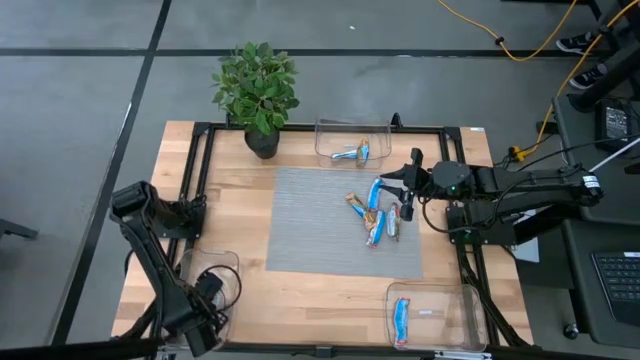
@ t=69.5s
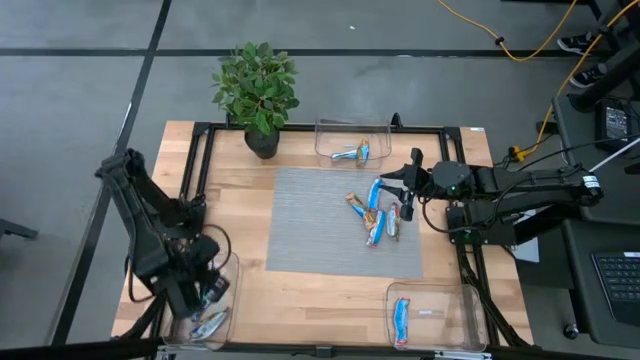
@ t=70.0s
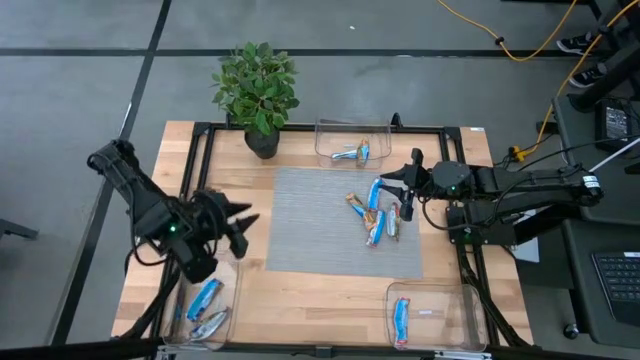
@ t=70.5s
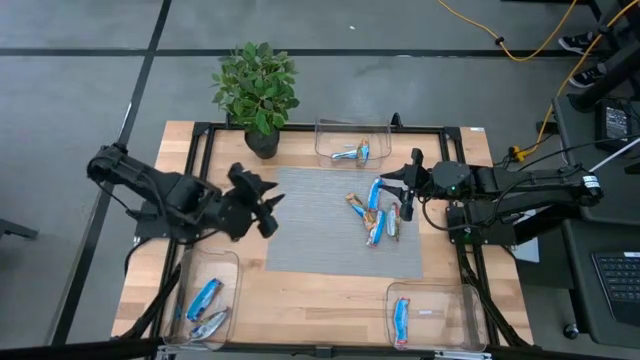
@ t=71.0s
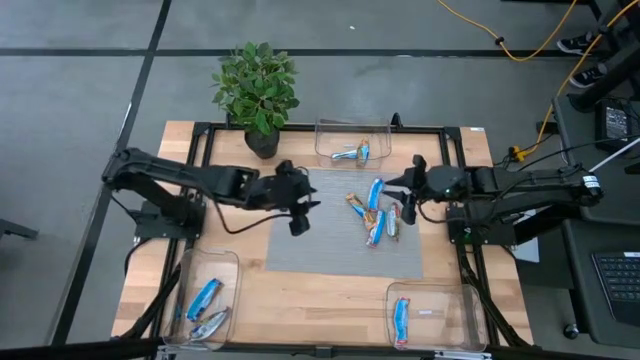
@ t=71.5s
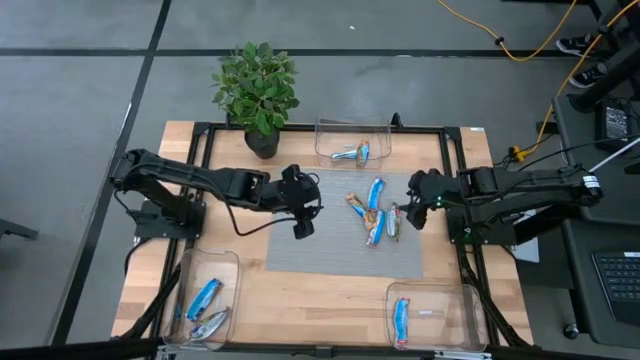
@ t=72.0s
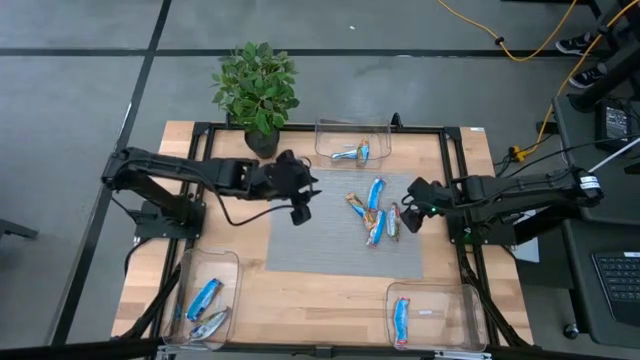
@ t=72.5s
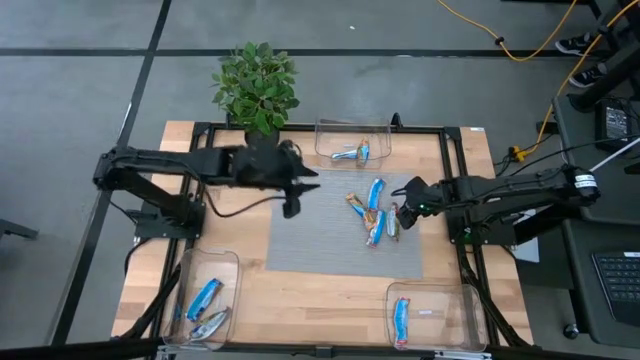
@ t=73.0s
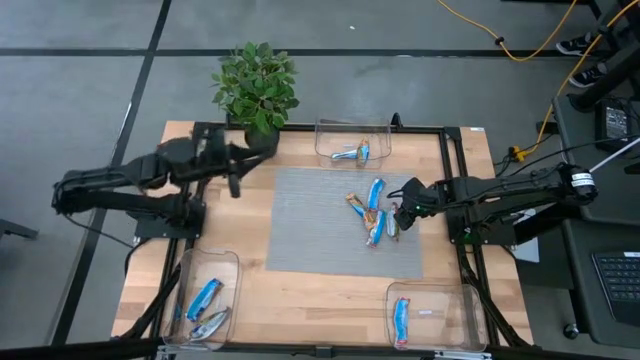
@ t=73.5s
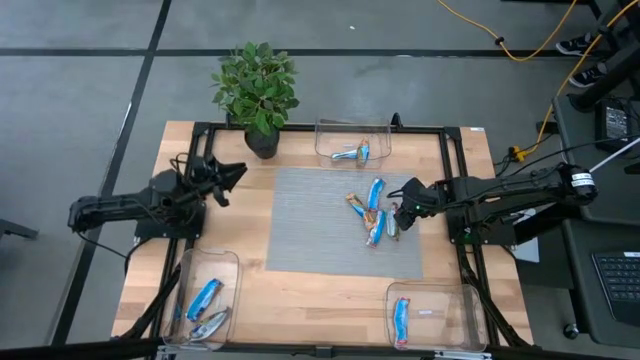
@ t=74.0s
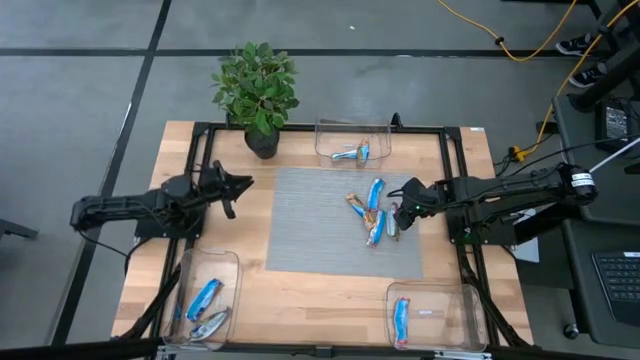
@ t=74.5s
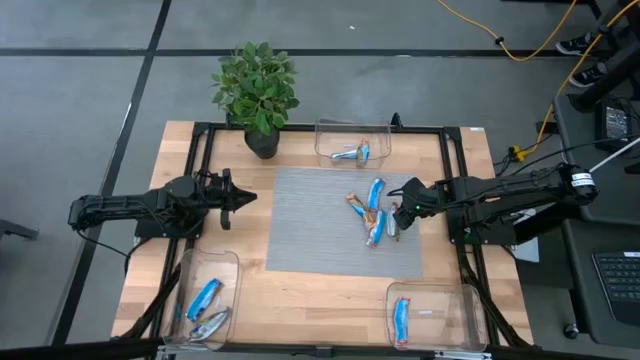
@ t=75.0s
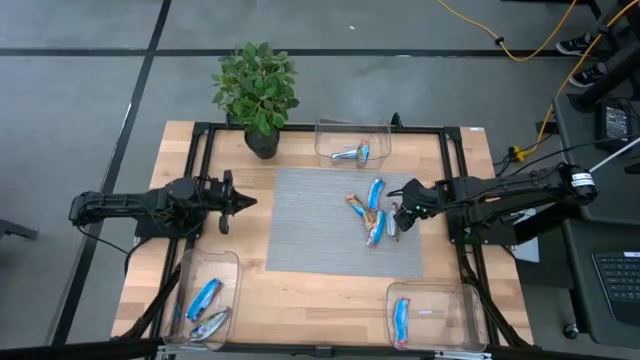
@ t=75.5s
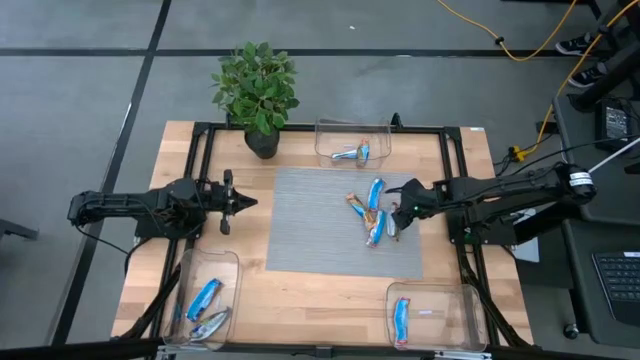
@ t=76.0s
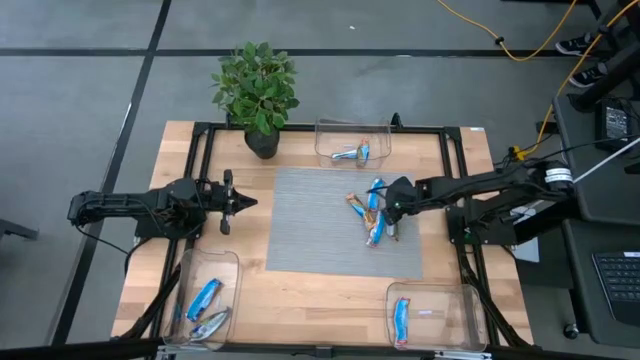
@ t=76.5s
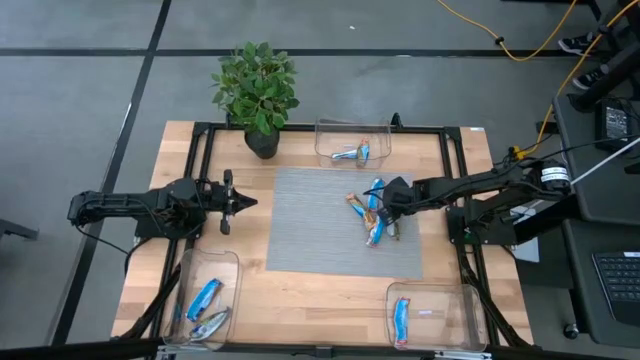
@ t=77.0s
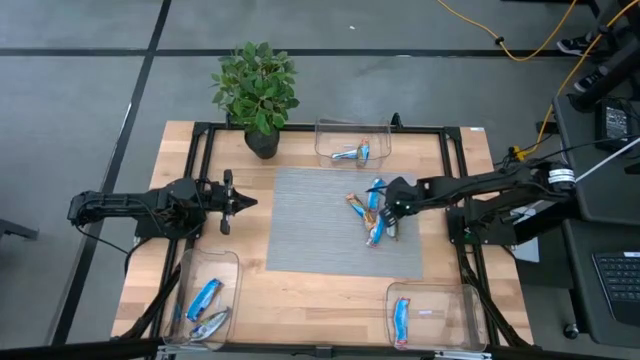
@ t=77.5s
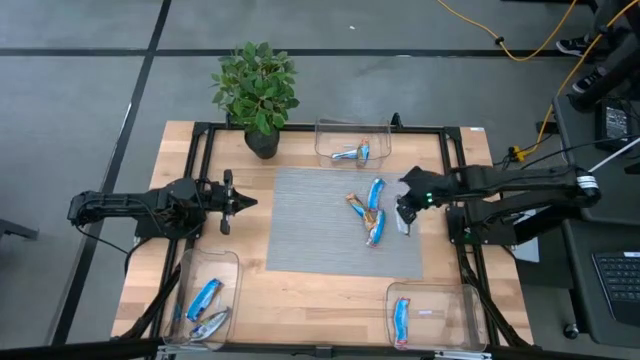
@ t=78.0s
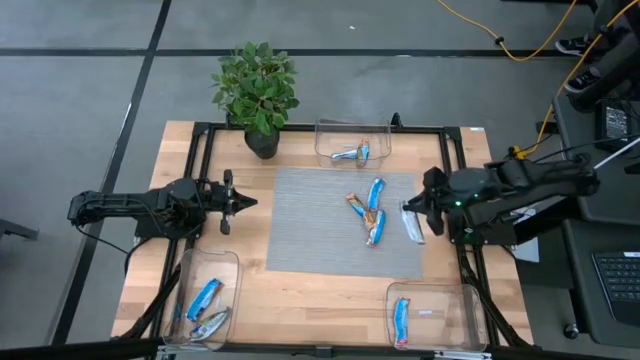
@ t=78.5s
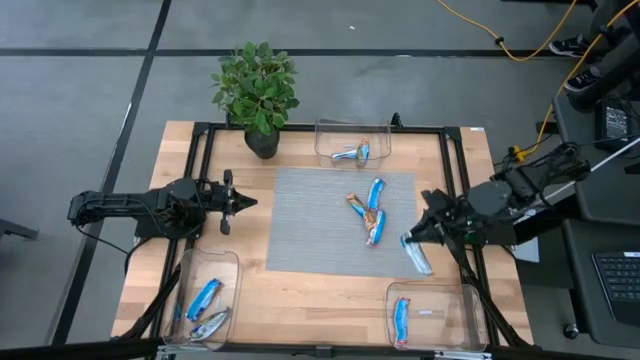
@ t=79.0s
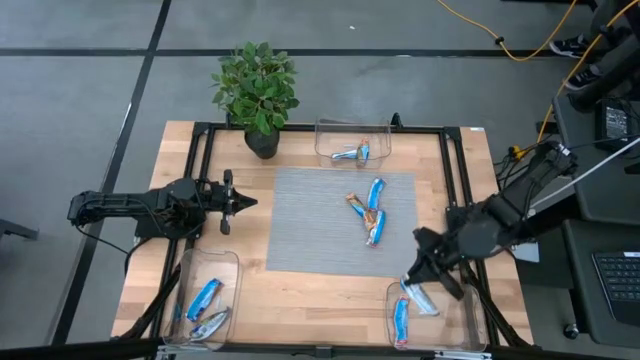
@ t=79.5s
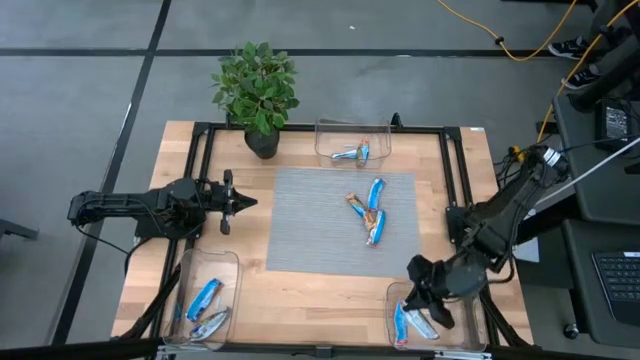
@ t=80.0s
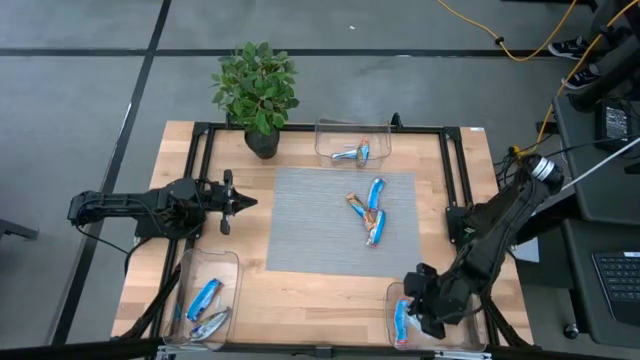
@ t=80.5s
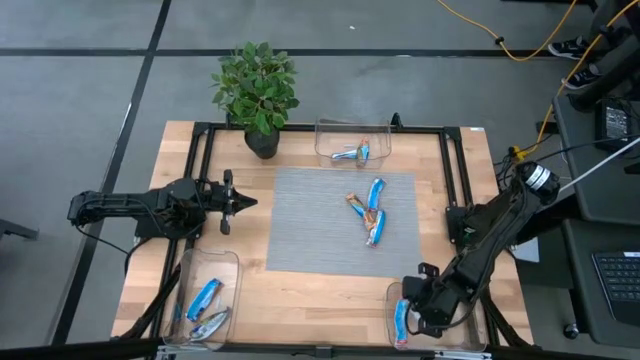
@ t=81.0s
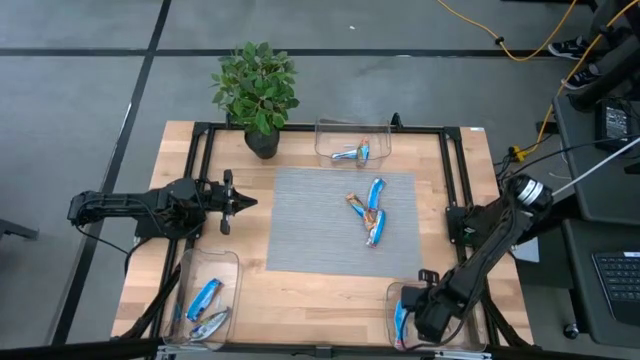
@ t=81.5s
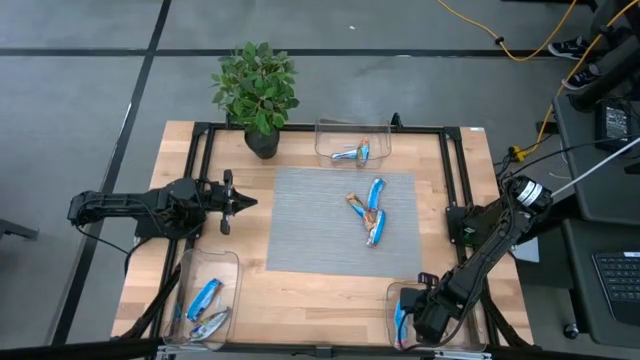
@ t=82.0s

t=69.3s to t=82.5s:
Task: Pick and place Granola Bars by type
Put the red granola bar into the bottom right transparent bin

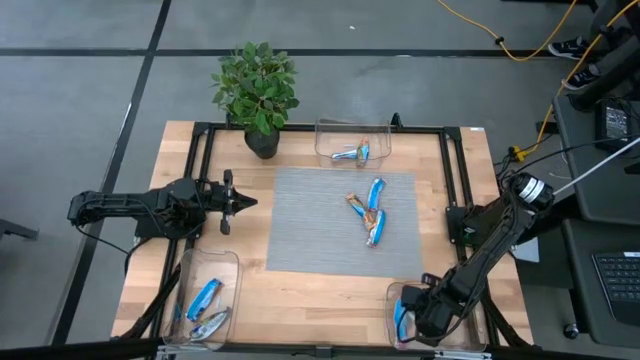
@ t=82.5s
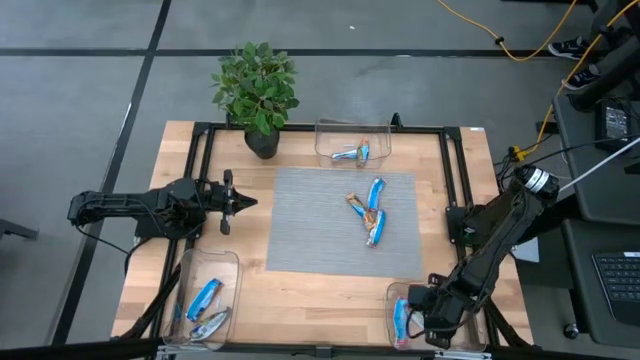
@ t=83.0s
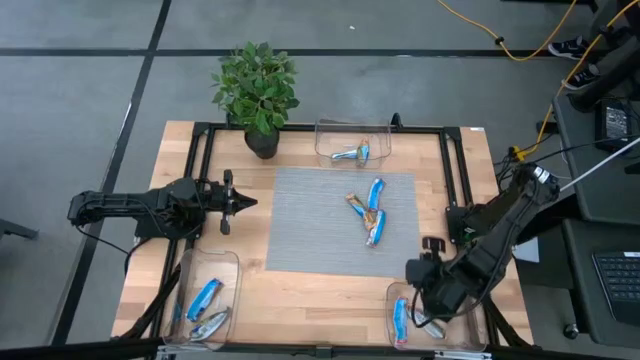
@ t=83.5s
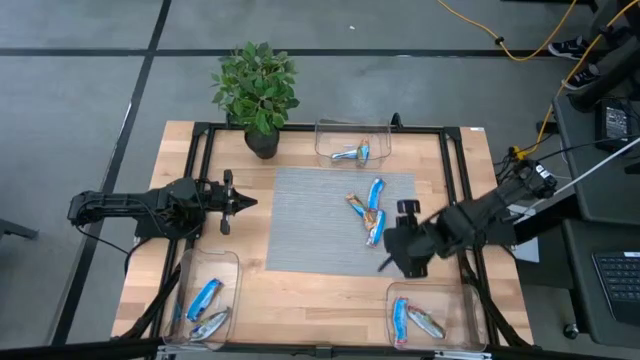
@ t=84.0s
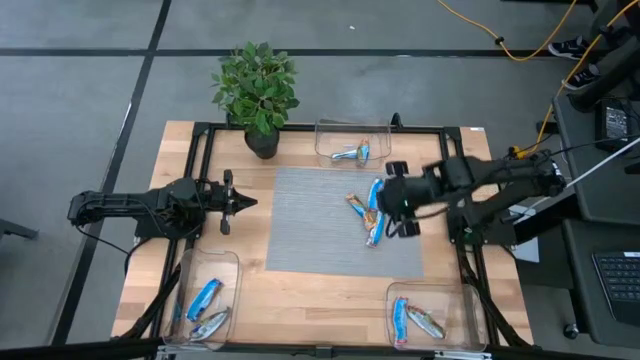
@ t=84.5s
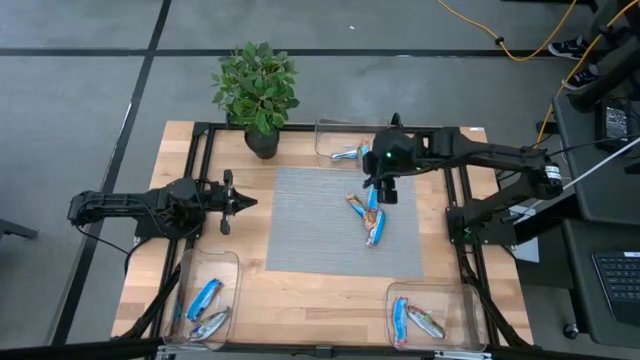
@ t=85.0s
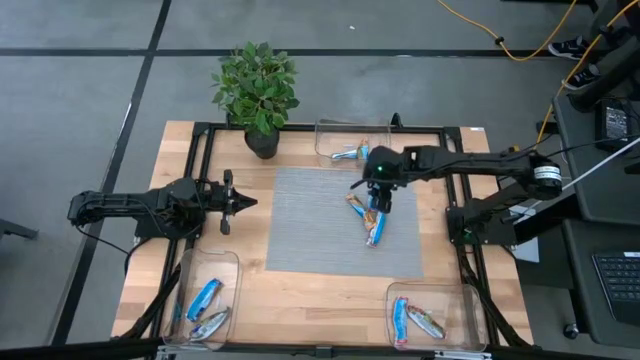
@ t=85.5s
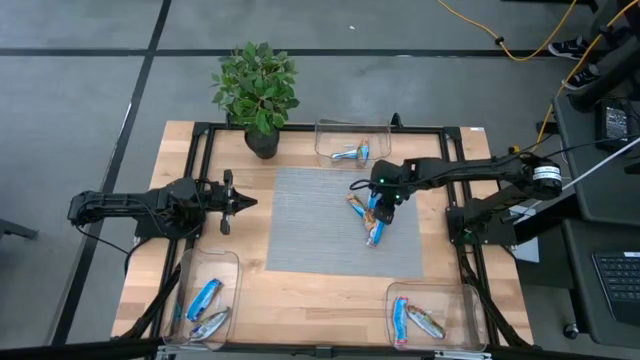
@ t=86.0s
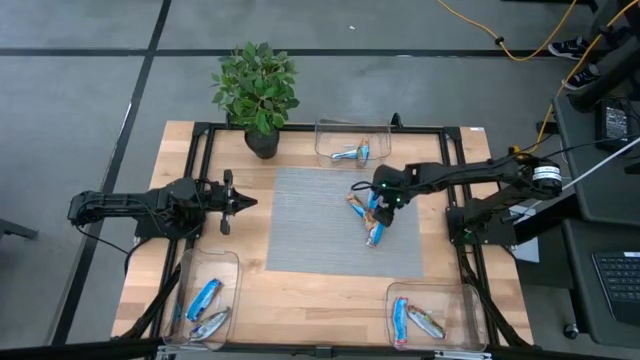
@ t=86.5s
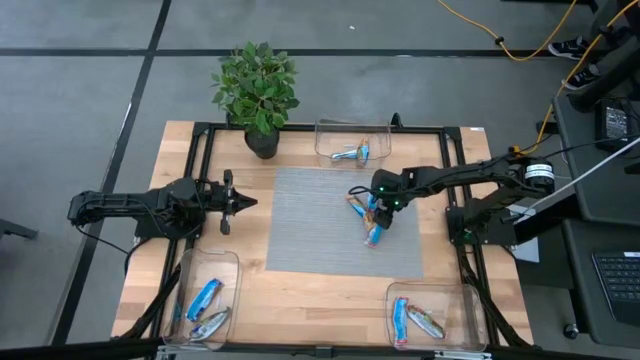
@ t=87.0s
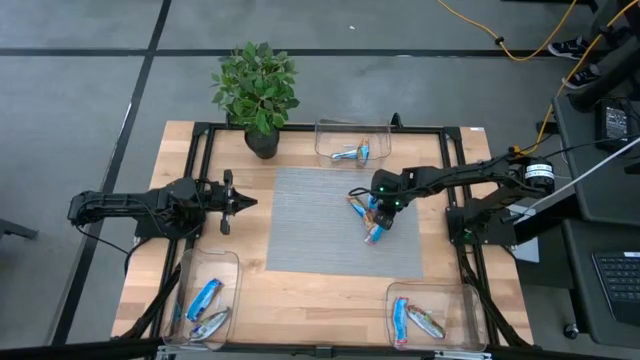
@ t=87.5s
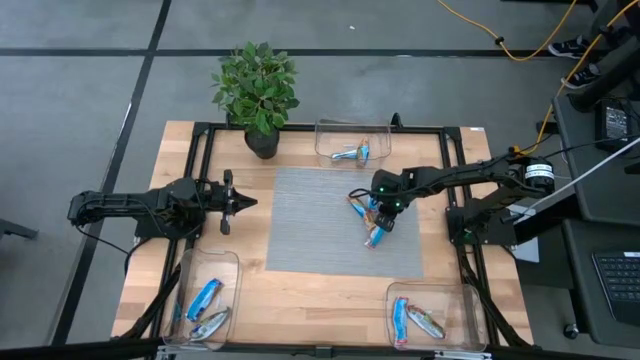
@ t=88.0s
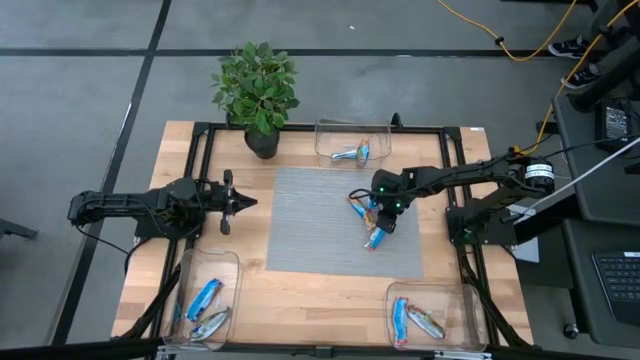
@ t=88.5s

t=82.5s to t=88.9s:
Put the red granola bar into the bottom right transparent bin
